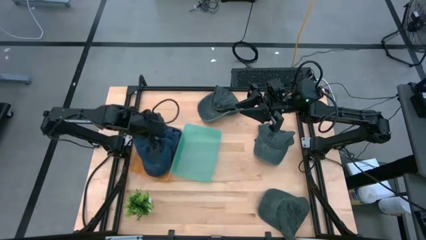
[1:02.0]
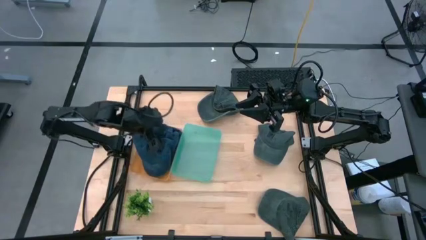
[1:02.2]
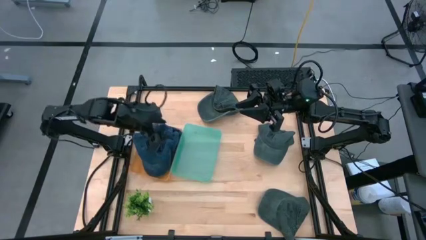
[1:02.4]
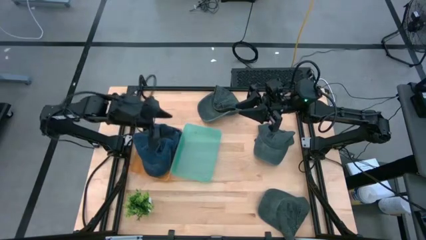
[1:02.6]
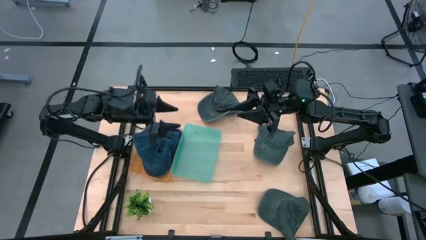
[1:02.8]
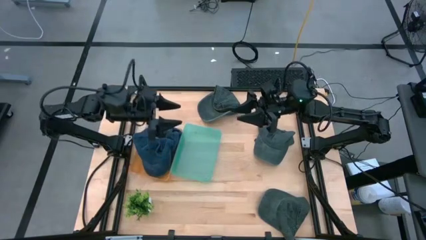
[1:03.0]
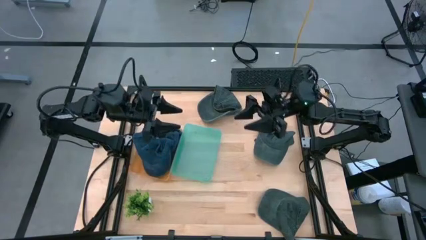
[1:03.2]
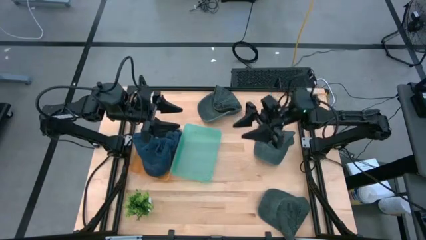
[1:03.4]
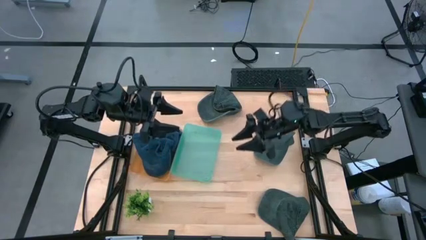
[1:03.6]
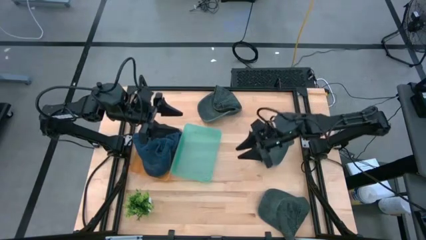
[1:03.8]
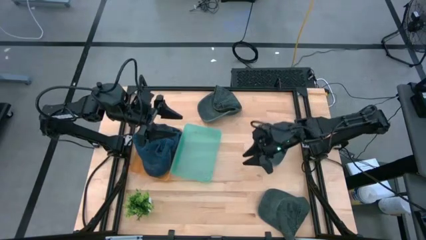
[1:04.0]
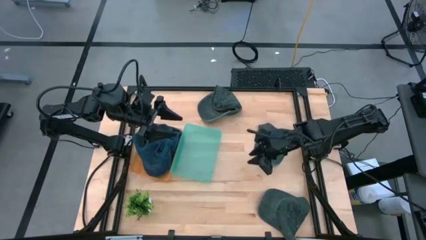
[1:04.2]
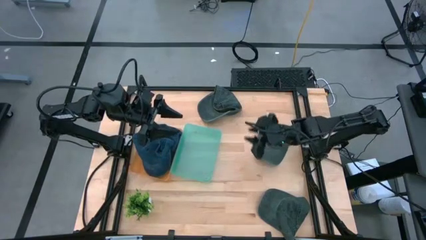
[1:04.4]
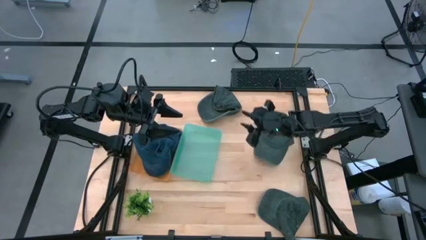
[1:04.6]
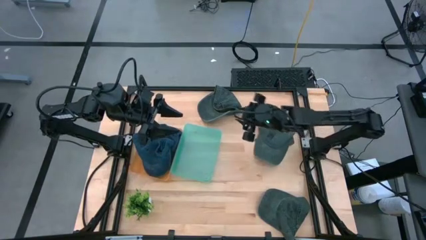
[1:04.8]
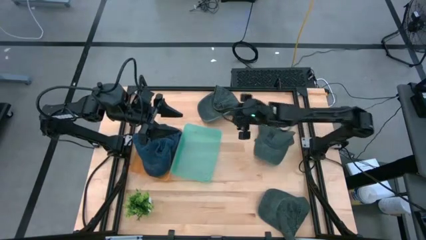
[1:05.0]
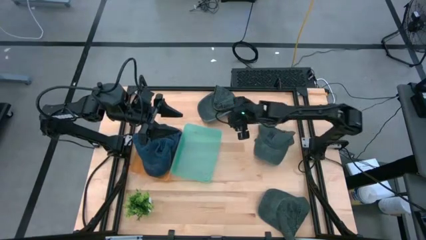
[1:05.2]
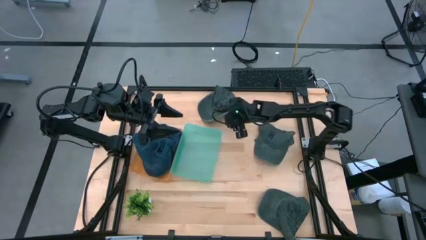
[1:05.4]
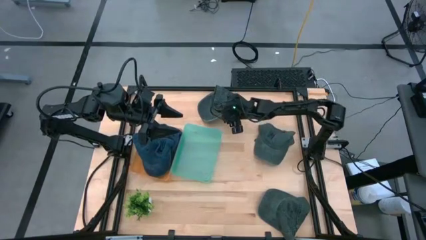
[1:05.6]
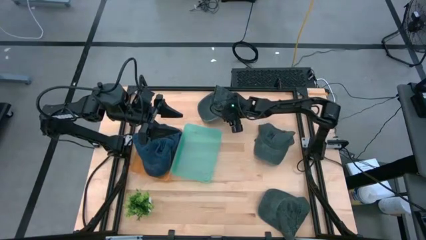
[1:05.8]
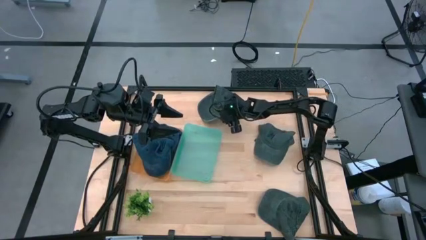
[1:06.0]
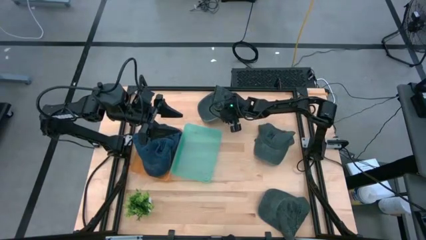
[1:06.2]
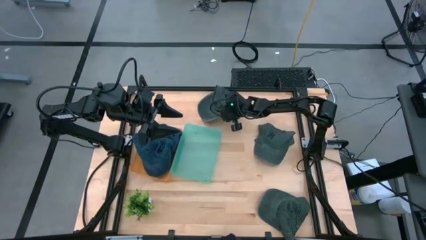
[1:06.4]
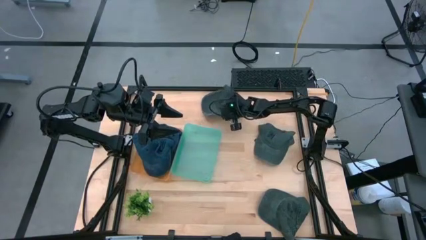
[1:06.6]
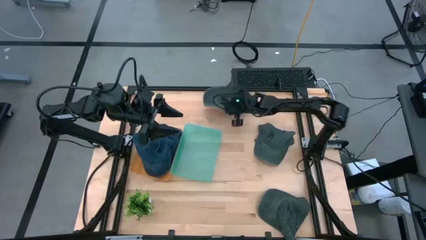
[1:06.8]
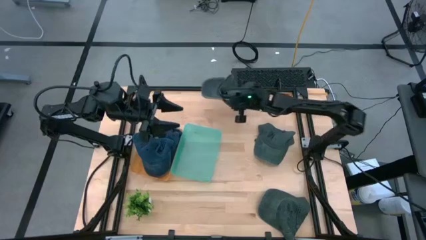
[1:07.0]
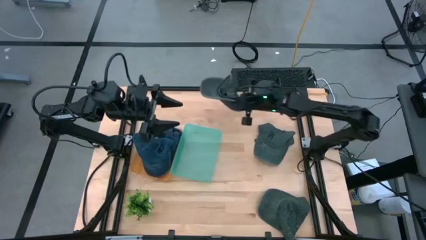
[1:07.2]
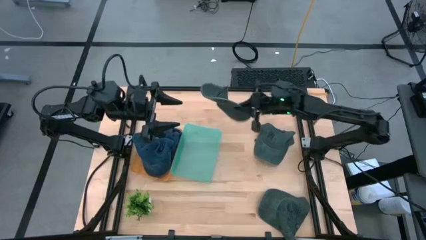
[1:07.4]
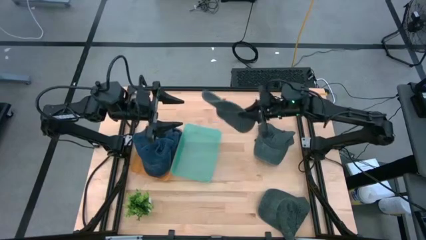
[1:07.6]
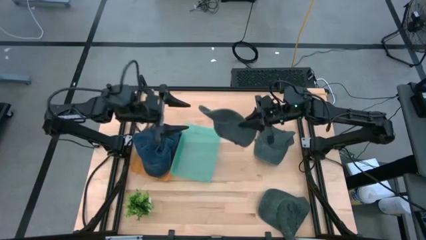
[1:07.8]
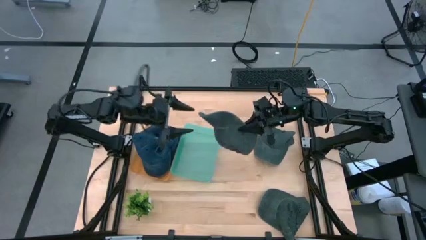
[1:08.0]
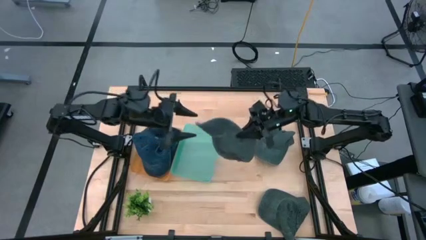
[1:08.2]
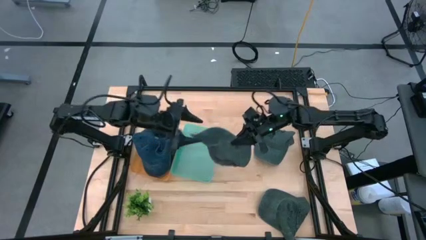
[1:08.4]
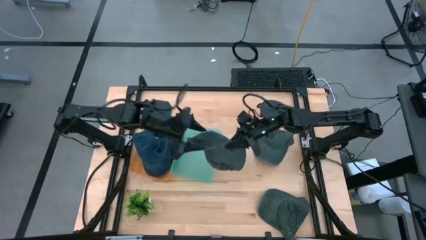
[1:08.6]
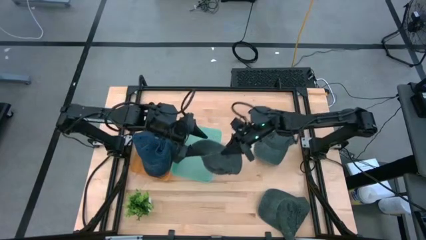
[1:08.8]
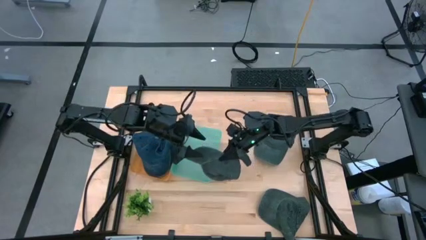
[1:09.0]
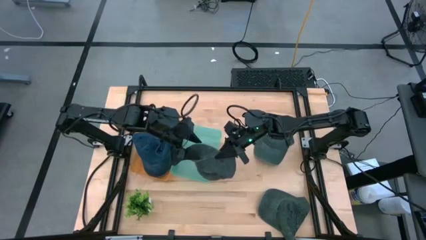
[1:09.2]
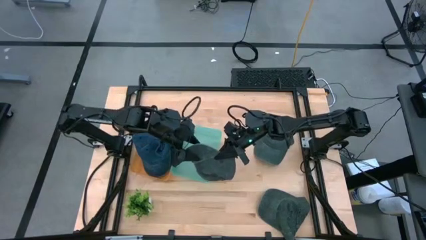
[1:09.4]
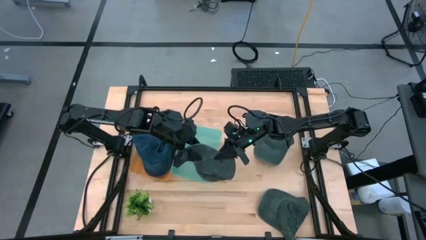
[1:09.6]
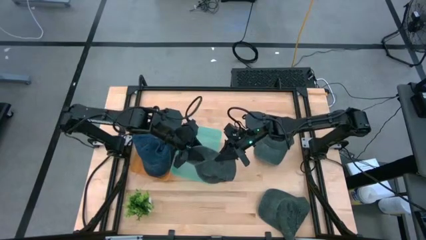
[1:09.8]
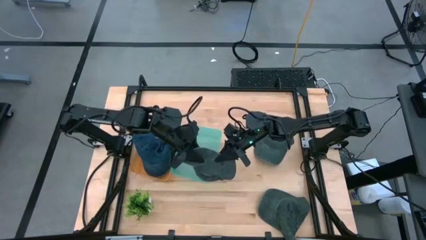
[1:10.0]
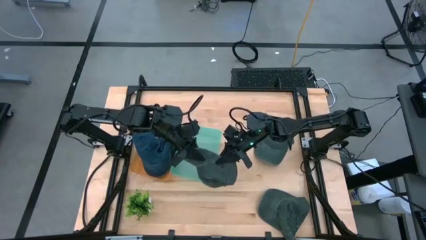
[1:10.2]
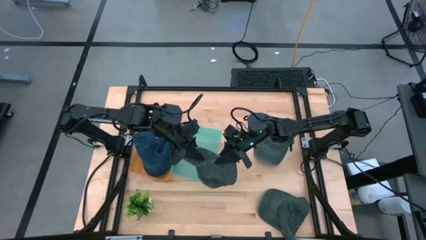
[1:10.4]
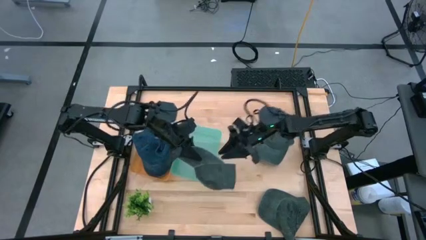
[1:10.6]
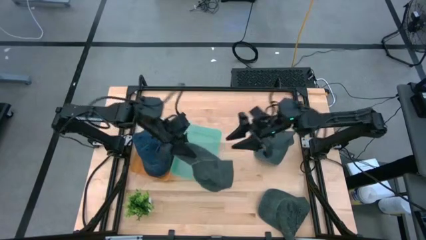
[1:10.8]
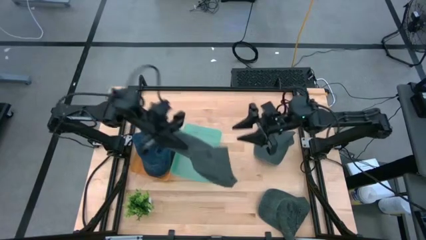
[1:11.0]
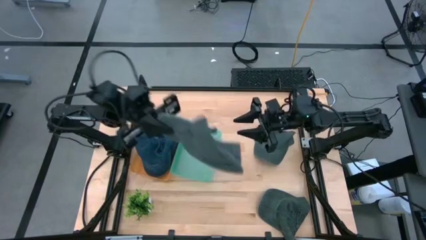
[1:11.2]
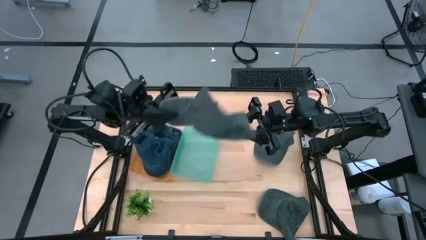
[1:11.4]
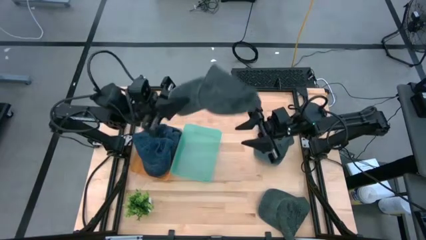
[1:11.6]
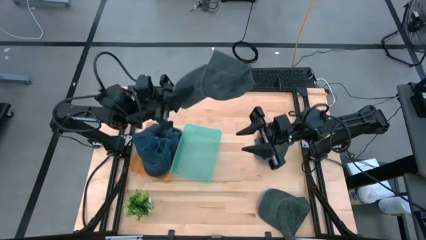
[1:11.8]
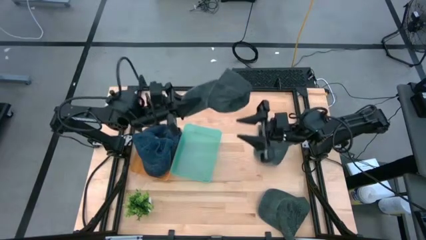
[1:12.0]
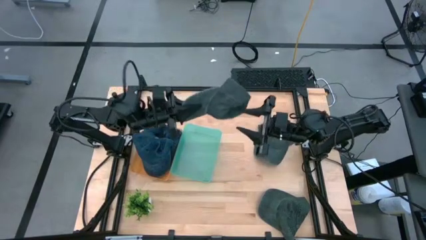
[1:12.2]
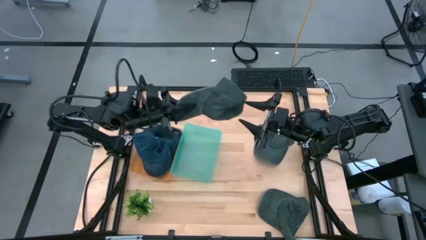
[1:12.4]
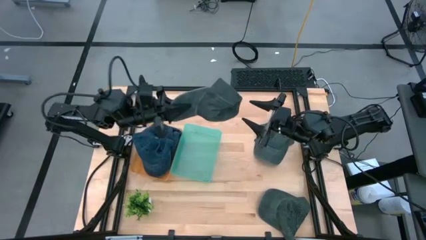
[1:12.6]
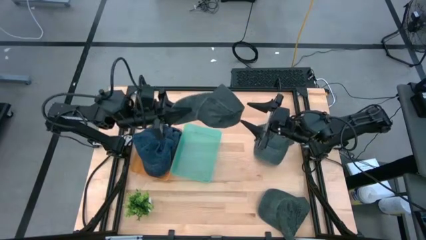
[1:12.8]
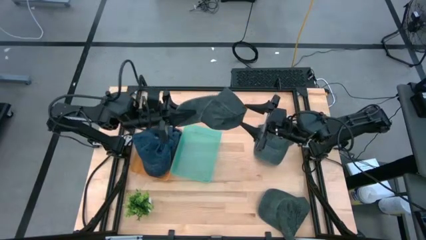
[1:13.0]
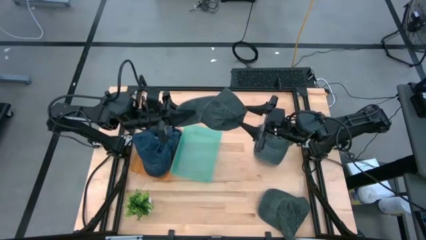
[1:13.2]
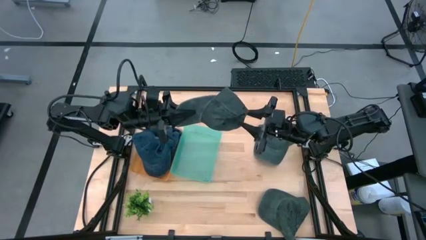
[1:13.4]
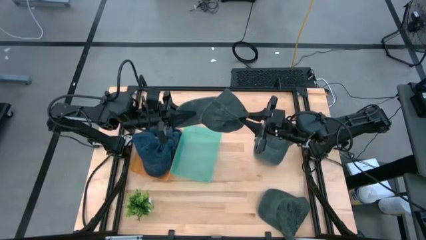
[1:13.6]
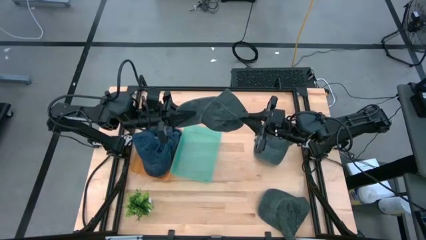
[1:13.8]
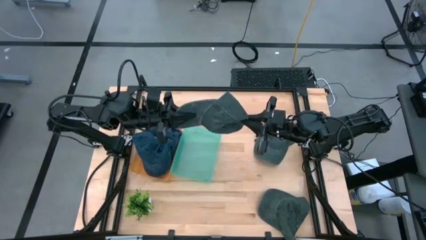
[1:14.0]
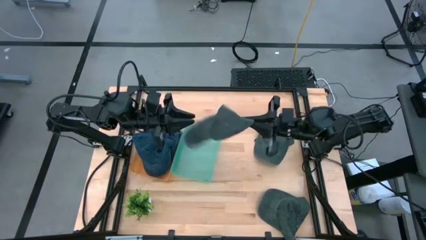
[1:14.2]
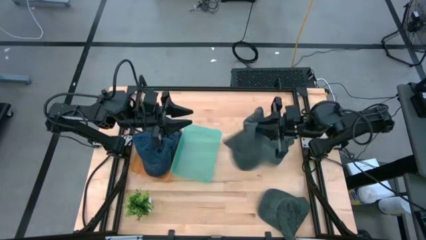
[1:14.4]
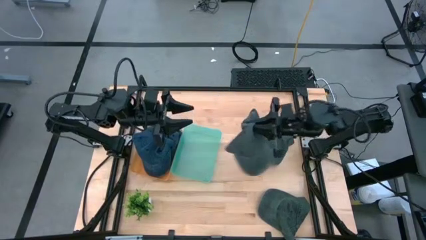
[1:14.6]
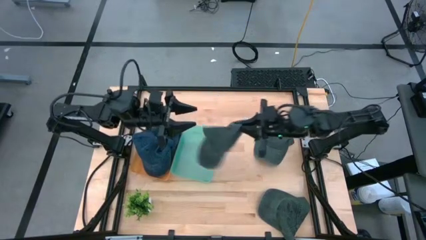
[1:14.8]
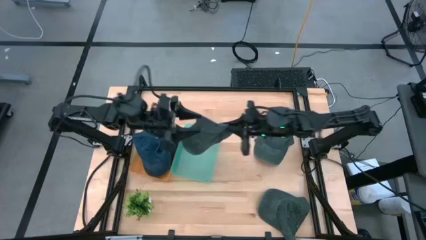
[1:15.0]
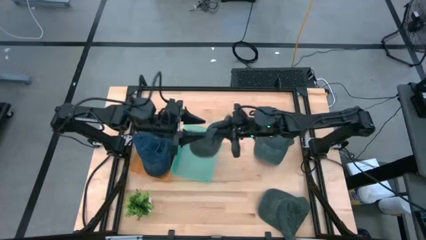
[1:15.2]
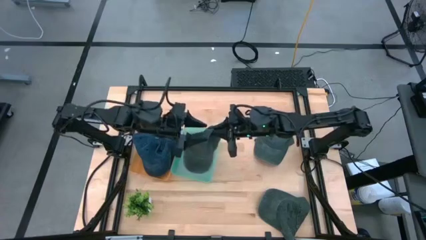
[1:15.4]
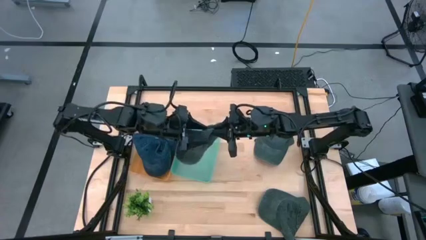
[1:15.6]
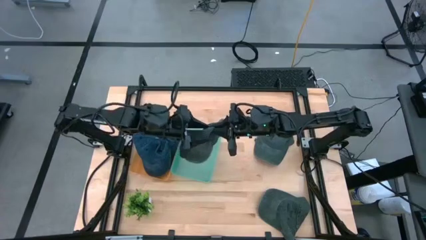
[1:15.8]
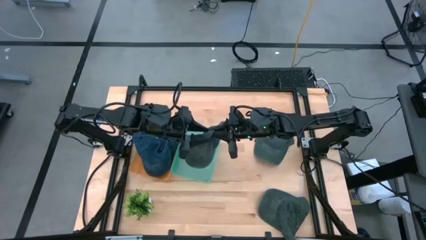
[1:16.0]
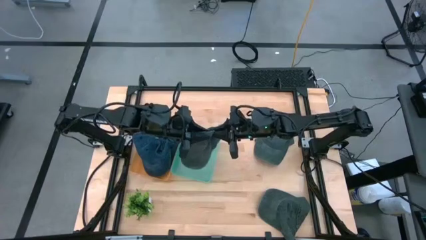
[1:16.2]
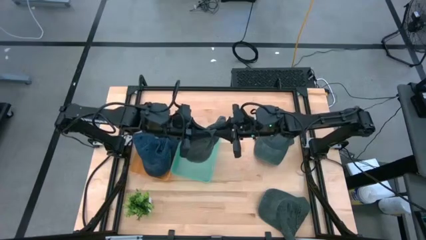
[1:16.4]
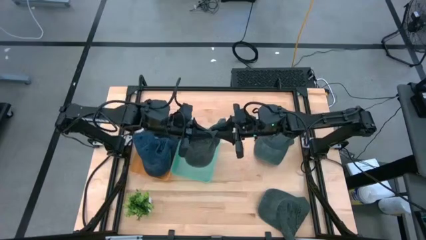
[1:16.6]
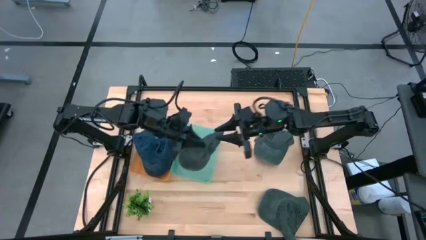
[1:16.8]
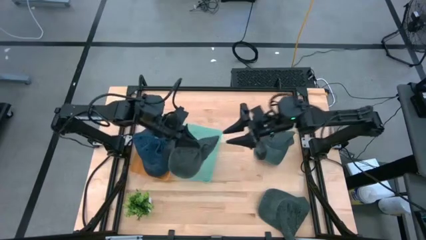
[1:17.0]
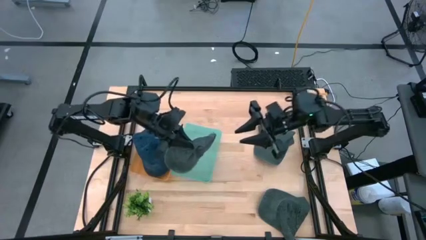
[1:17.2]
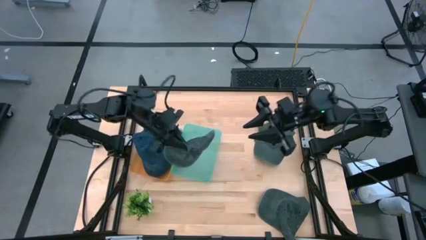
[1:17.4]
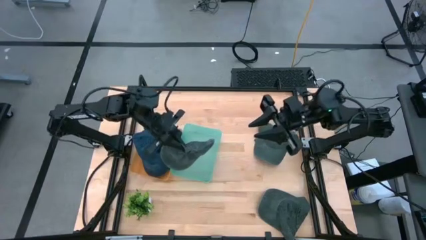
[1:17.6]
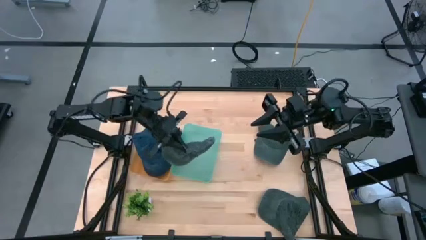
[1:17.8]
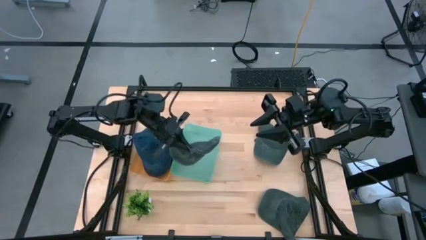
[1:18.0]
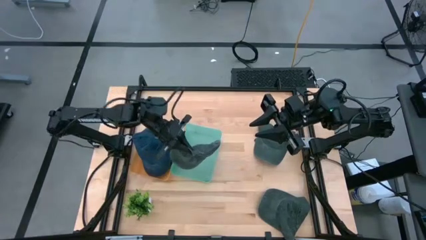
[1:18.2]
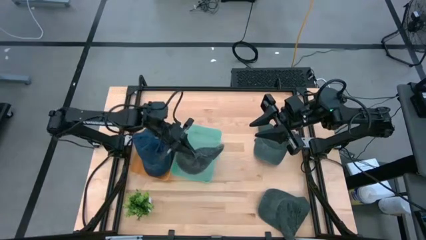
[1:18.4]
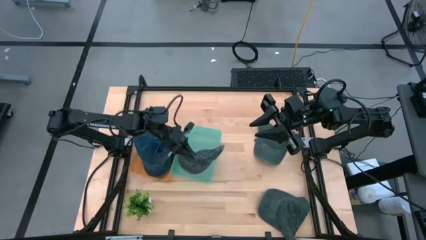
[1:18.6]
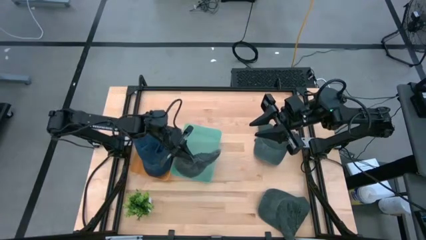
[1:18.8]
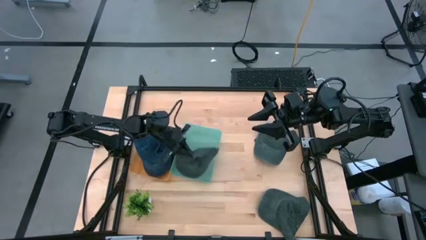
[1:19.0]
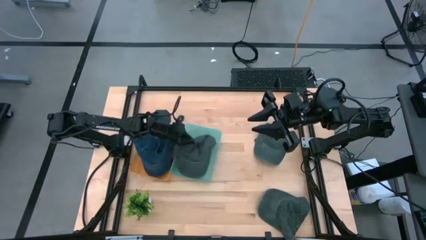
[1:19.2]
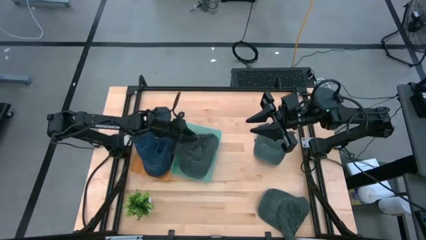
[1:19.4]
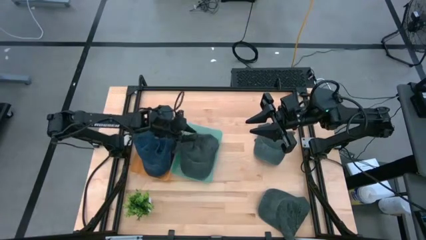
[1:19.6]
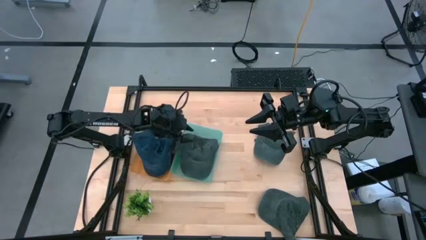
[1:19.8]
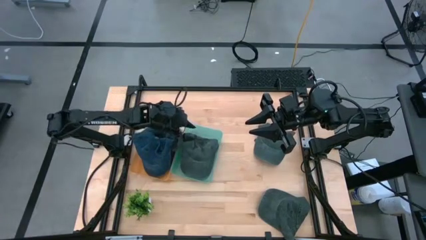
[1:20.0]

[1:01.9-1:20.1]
Task: Pick & Place hat
Put the top left black cap into the green bin
